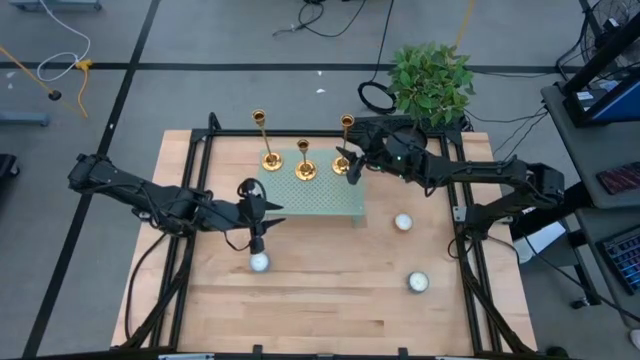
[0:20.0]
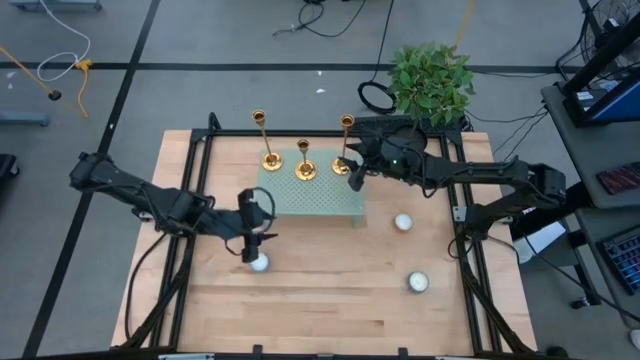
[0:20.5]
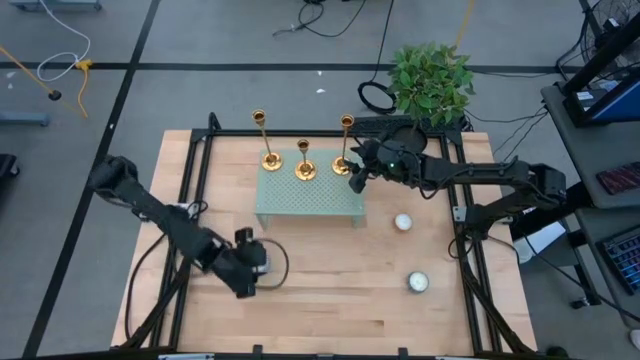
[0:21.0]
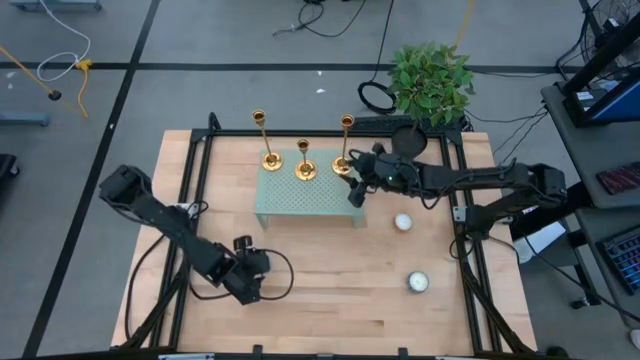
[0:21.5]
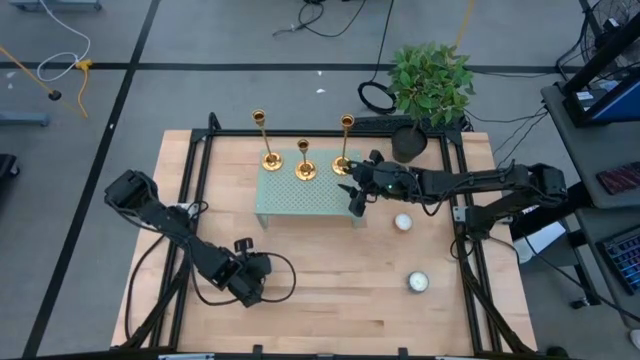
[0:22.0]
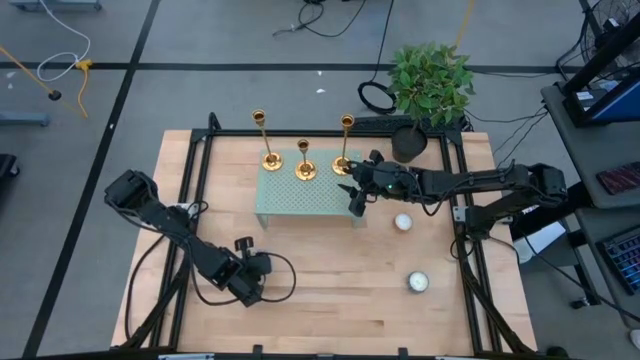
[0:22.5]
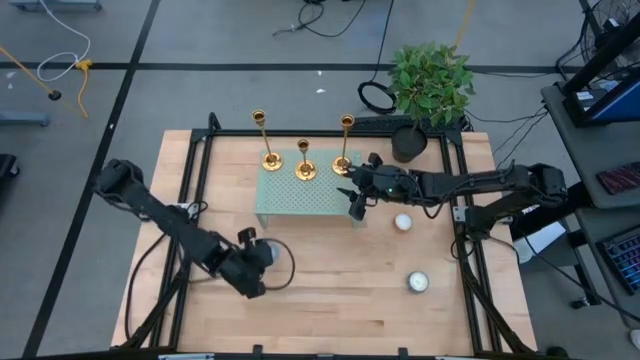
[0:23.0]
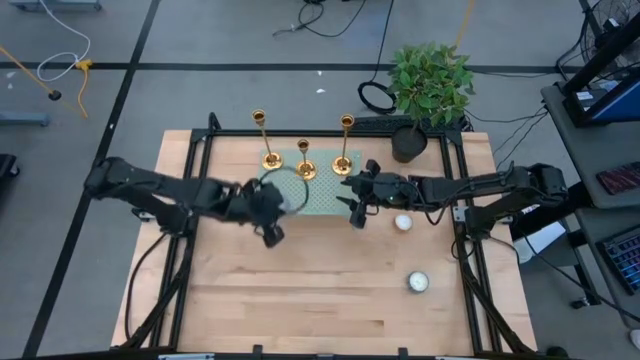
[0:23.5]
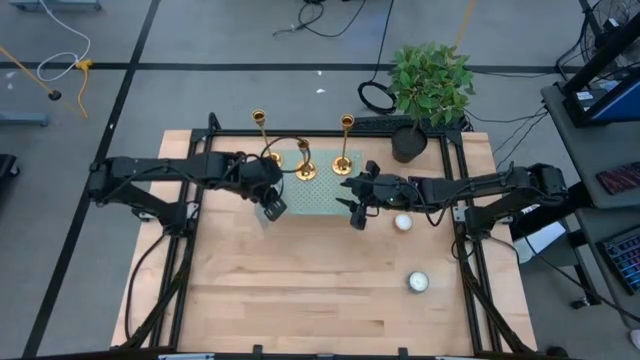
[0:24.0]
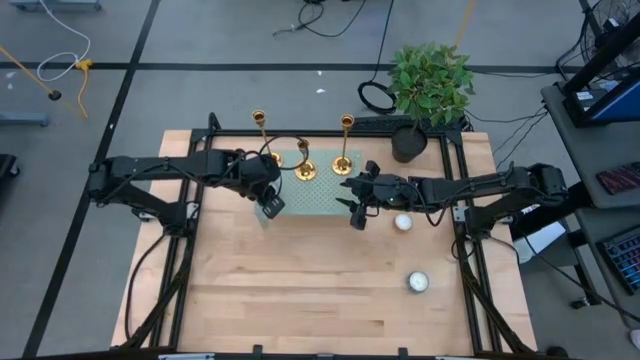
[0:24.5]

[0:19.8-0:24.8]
Task: Pick & Place candle stick holders
Put the left blue scented candle on top of the shelf

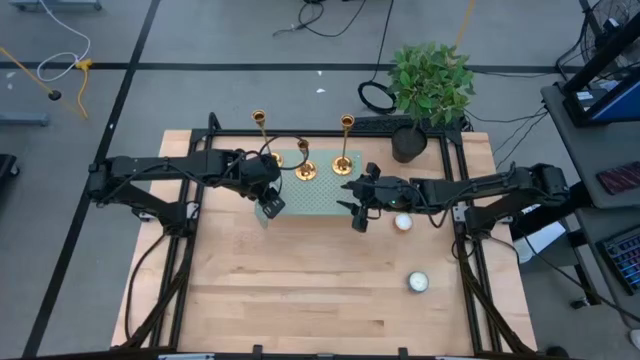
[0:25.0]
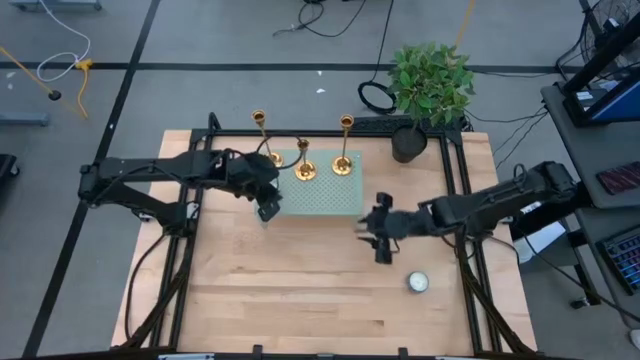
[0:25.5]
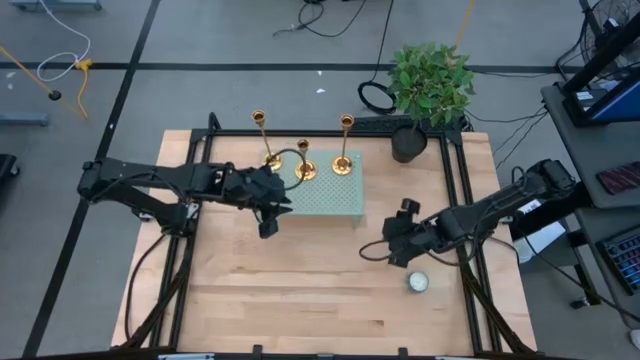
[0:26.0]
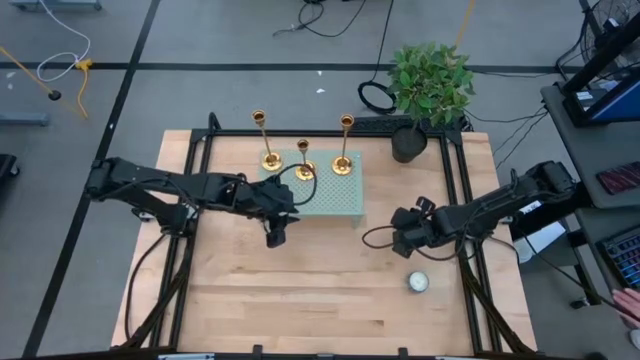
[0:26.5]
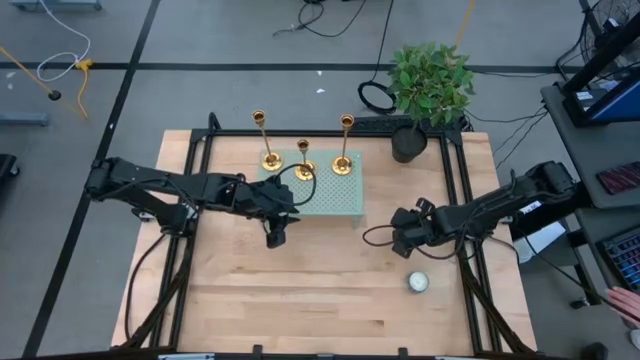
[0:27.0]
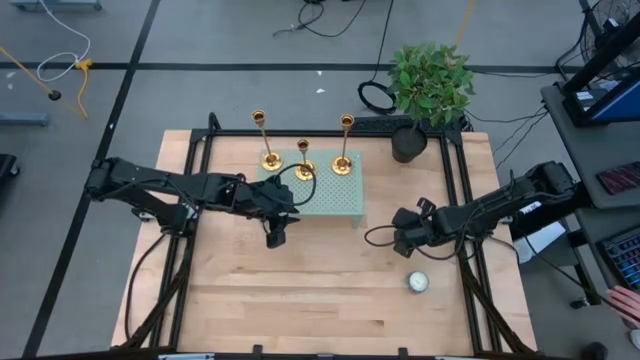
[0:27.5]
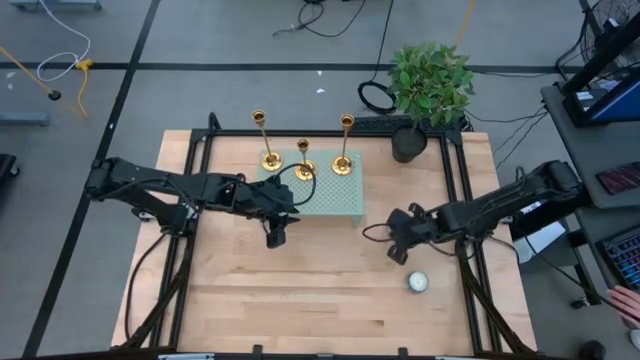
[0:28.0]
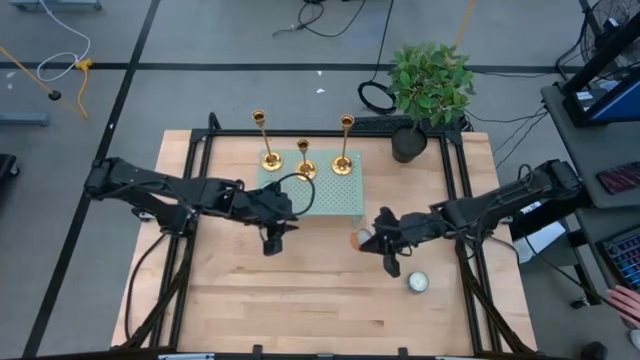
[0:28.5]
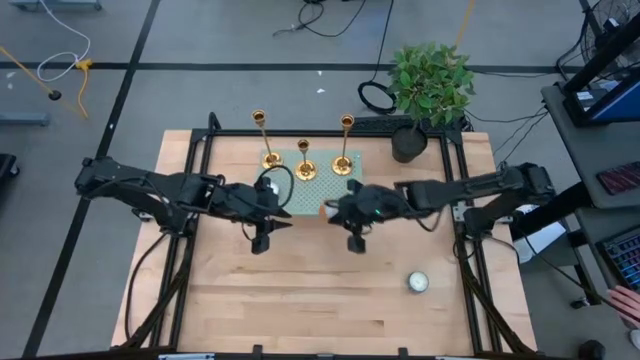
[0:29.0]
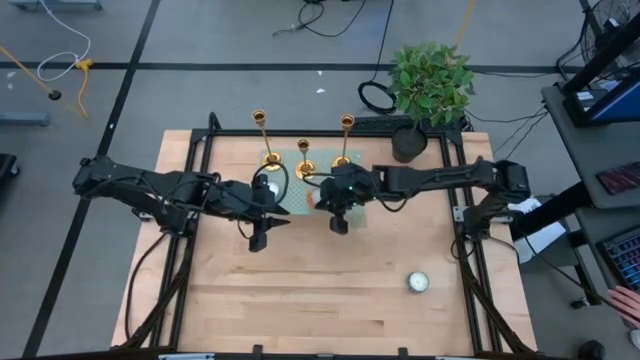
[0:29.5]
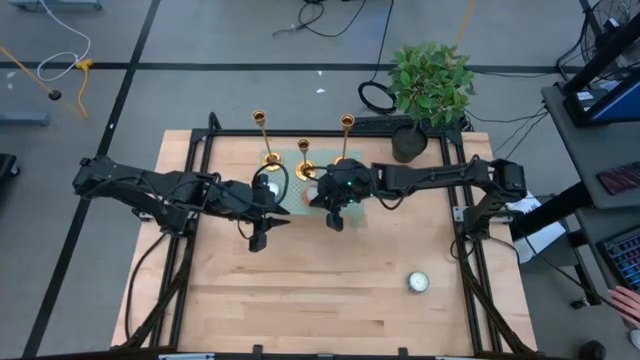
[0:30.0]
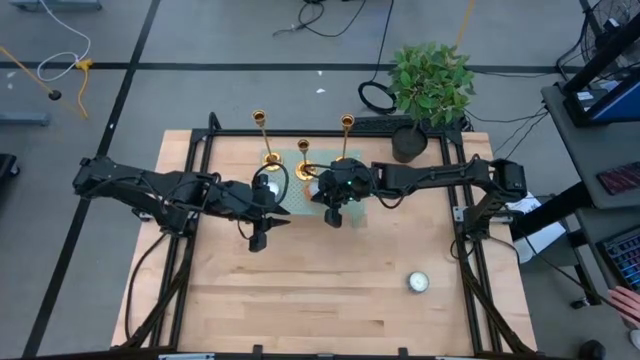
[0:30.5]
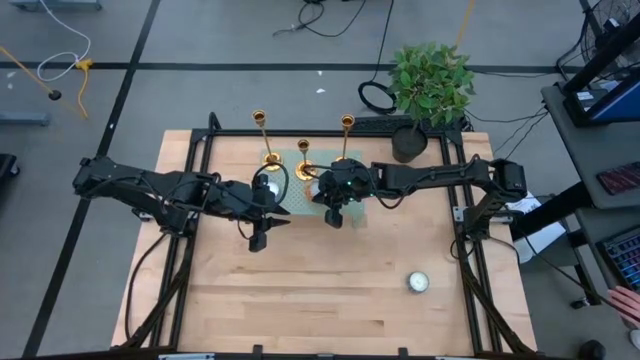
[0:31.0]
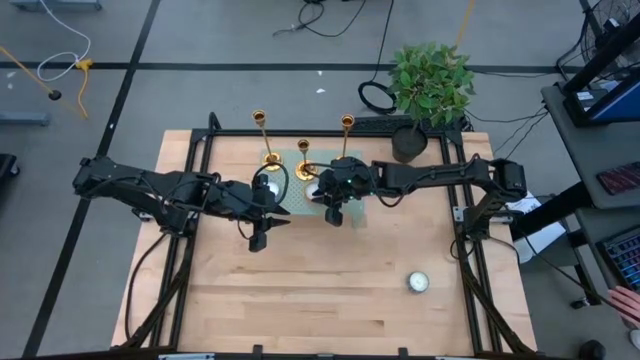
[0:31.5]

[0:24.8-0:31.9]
Put the orange scented candle on top of the shelf

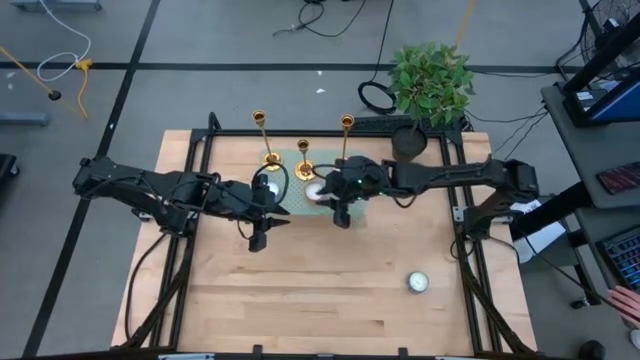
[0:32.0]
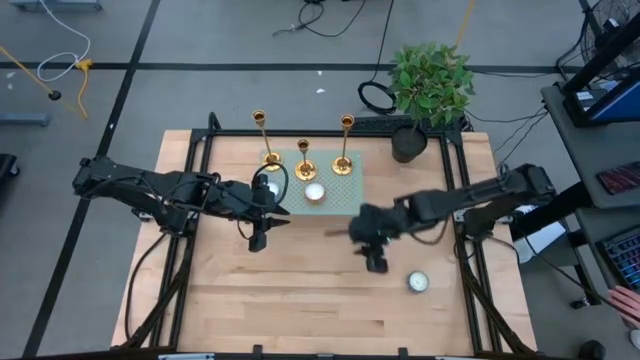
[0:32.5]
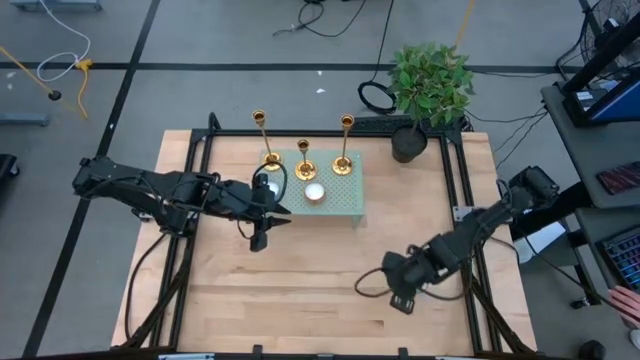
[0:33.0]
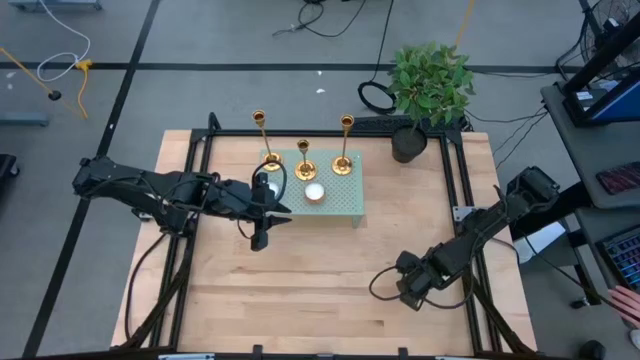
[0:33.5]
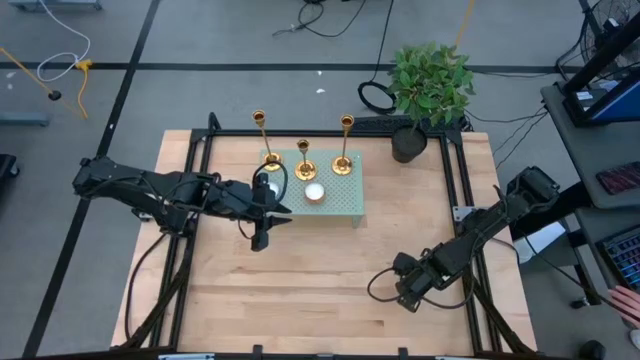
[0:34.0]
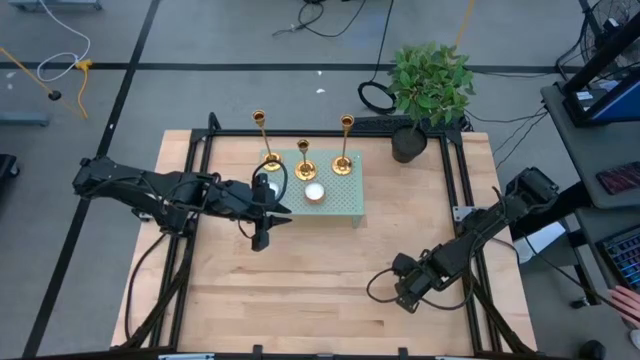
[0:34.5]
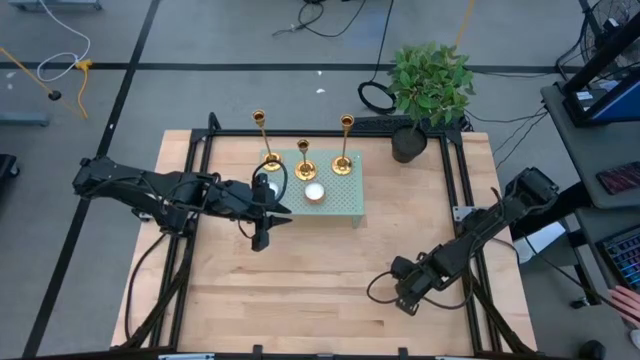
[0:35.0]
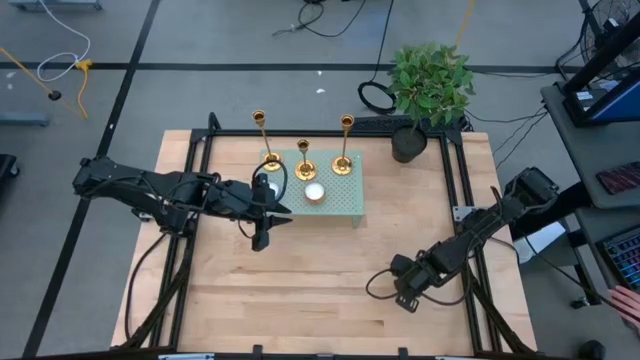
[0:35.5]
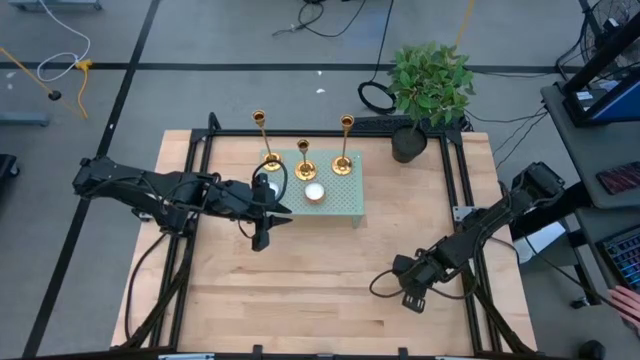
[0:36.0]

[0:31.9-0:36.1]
Put the blue scented candle on top of the shelf

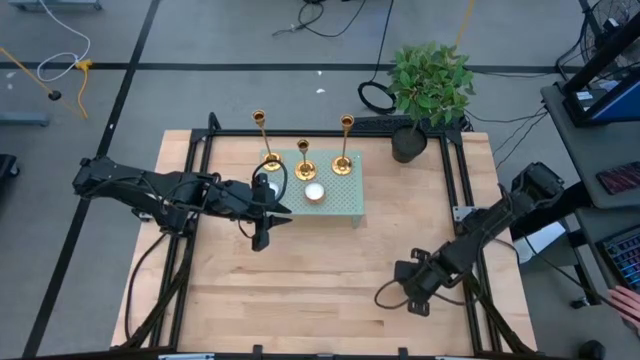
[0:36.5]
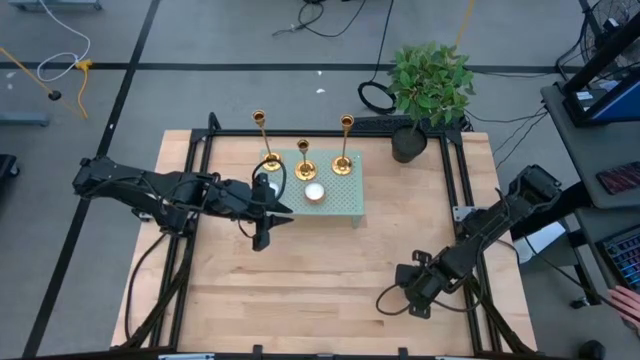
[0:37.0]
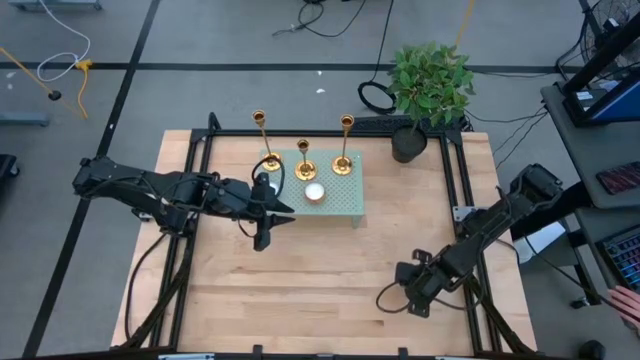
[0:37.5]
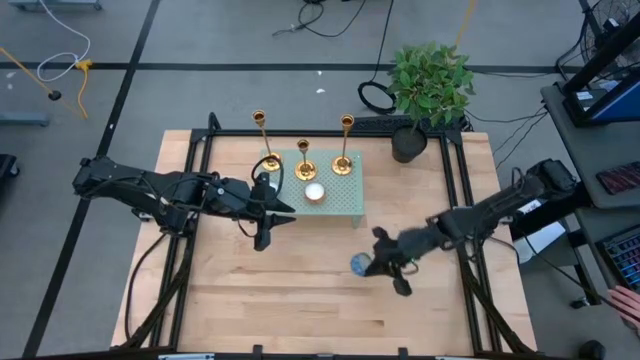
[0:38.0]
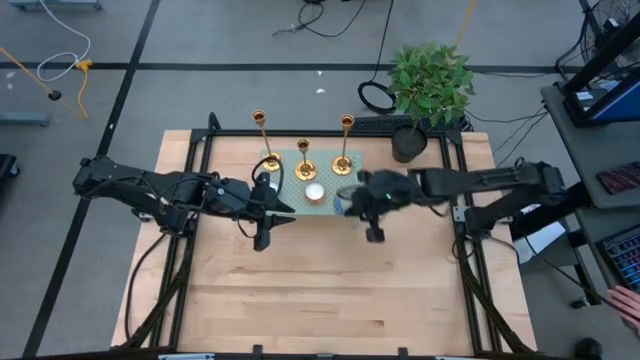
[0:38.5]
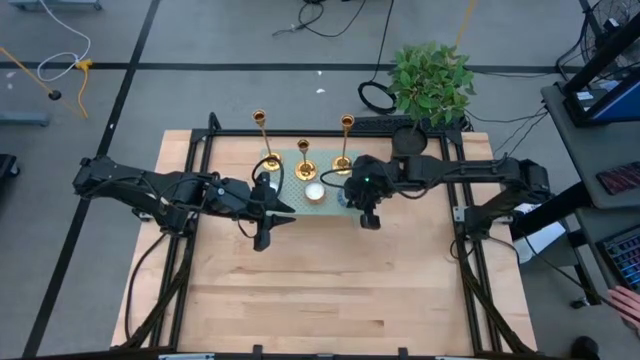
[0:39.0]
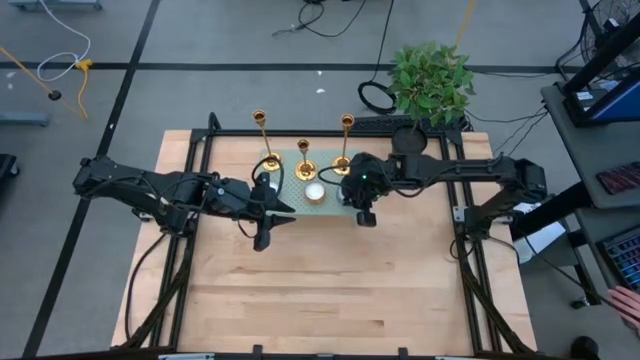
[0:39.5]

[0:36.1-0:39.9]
Put the blue scented candle on top of the shelf

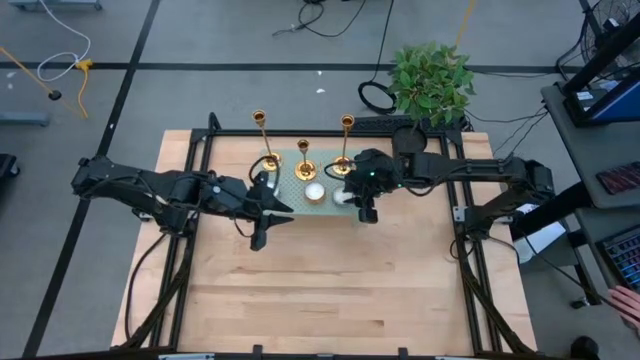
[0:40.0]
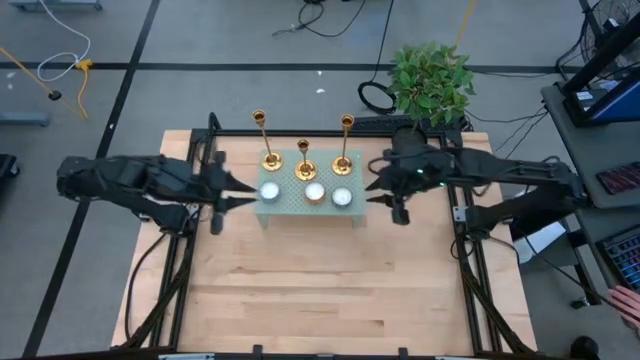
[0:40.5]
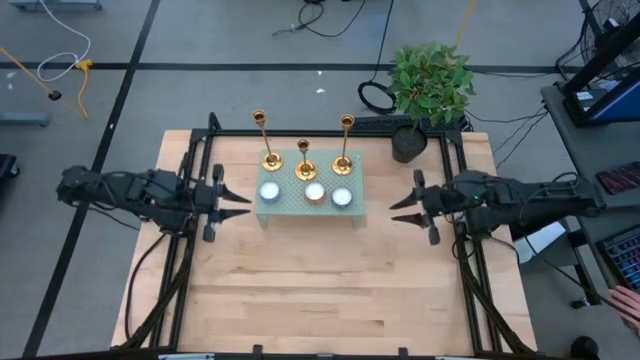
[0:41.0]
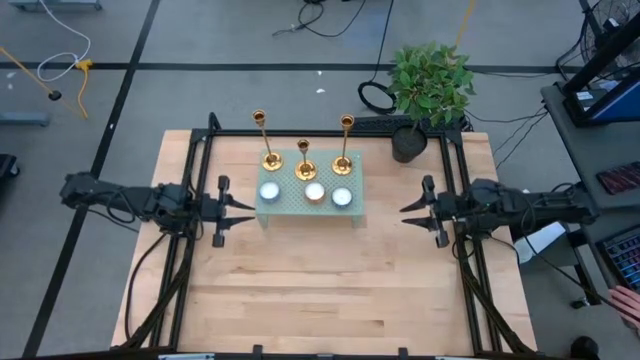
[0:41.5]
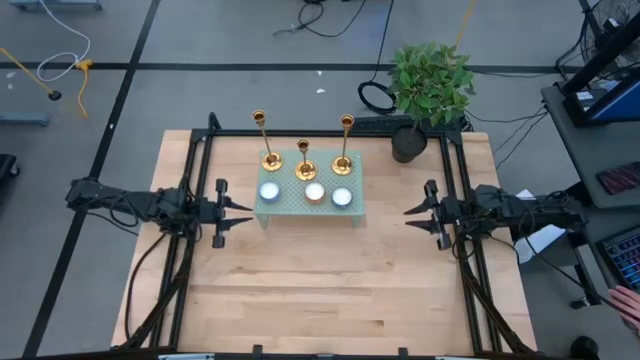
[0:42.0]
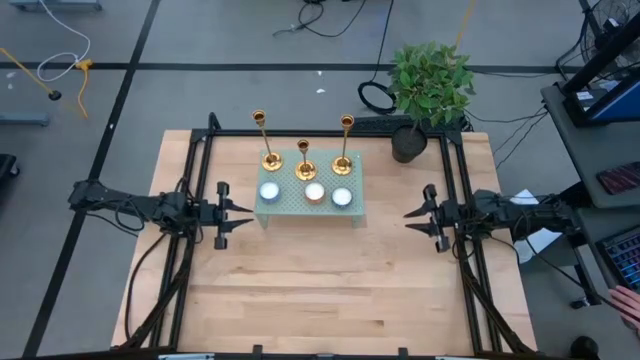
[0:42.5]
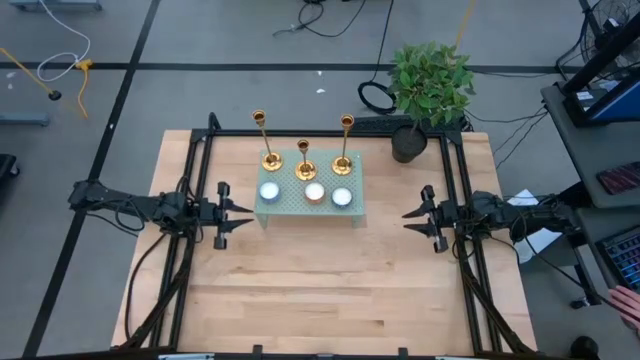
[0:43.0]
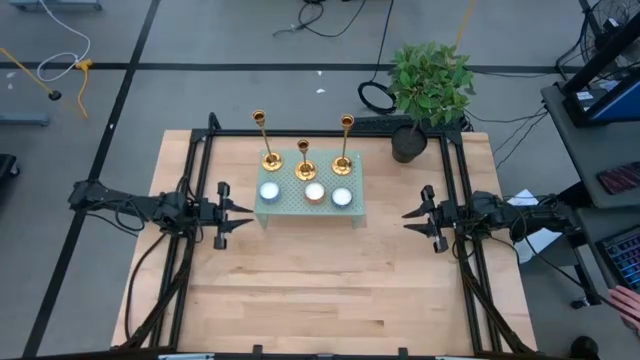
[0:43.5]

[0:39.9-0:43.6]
Return to Home Position
